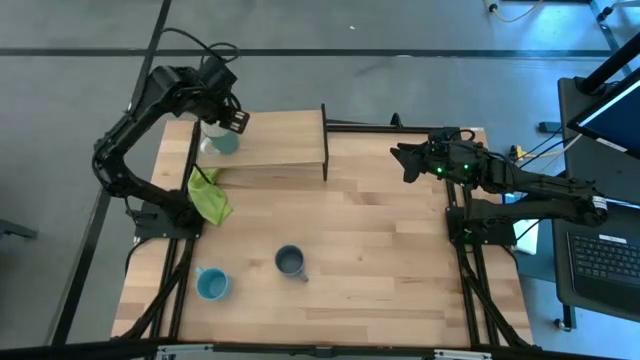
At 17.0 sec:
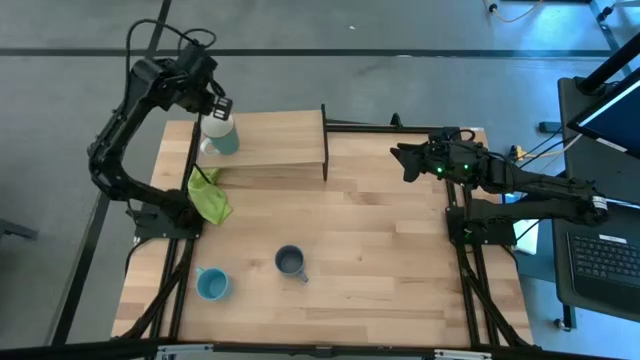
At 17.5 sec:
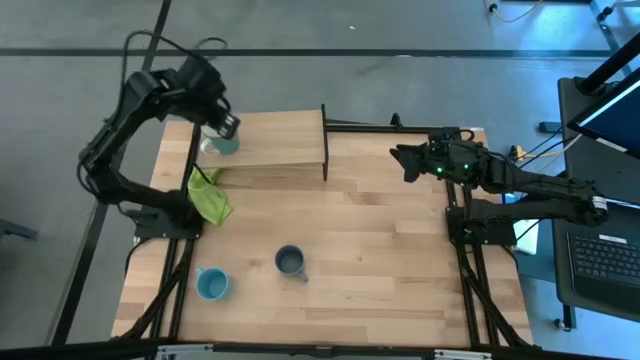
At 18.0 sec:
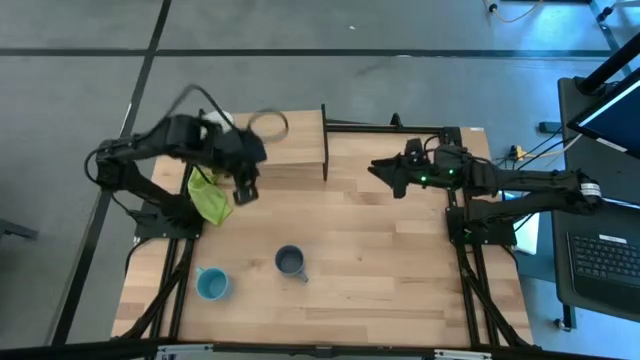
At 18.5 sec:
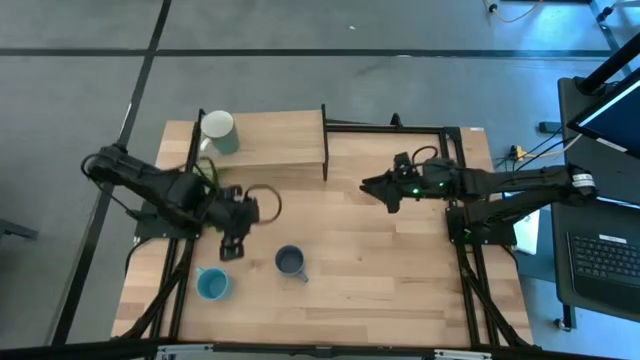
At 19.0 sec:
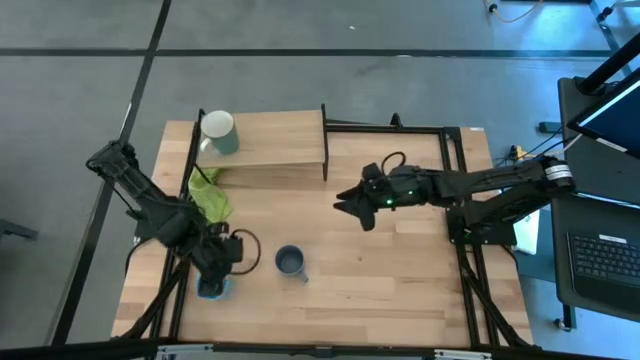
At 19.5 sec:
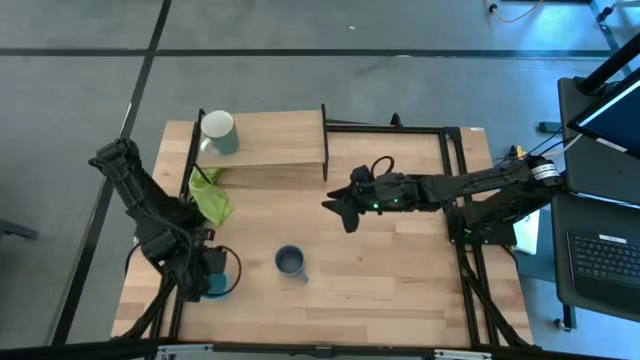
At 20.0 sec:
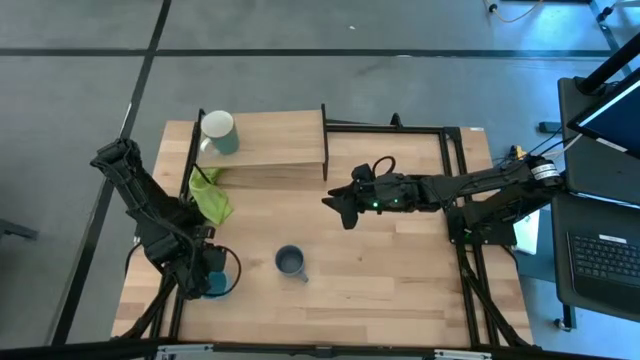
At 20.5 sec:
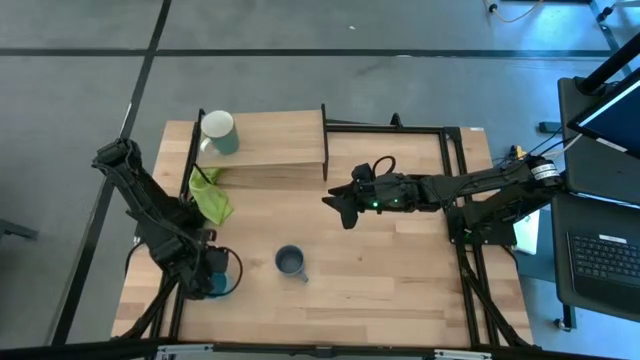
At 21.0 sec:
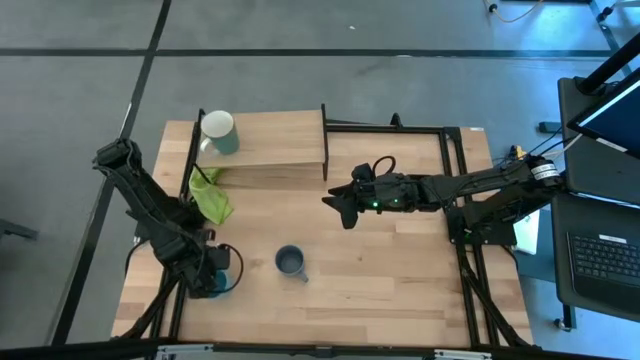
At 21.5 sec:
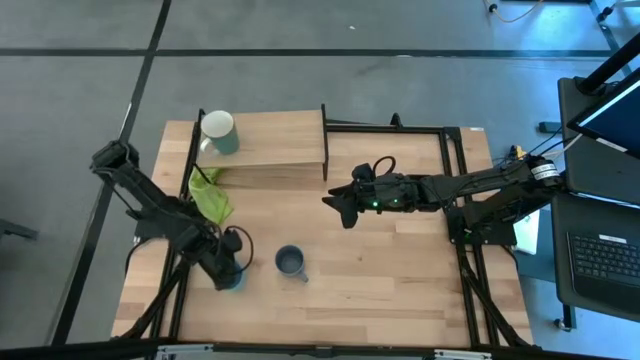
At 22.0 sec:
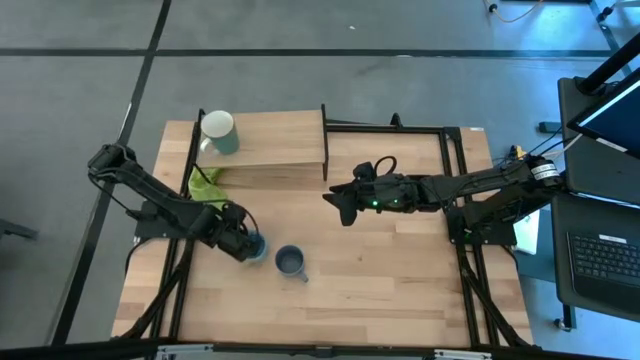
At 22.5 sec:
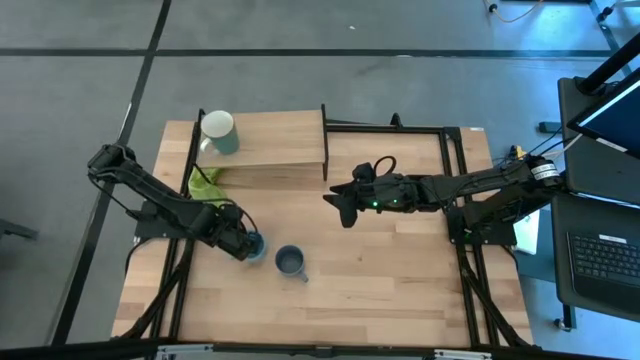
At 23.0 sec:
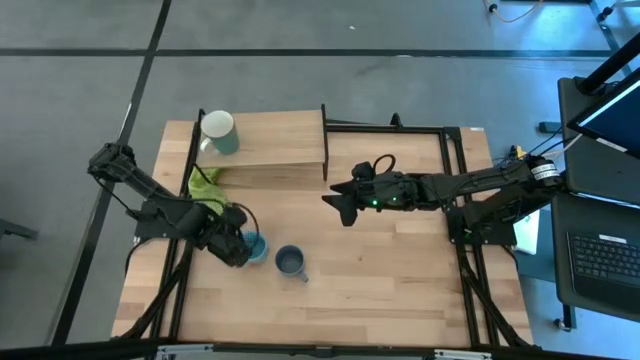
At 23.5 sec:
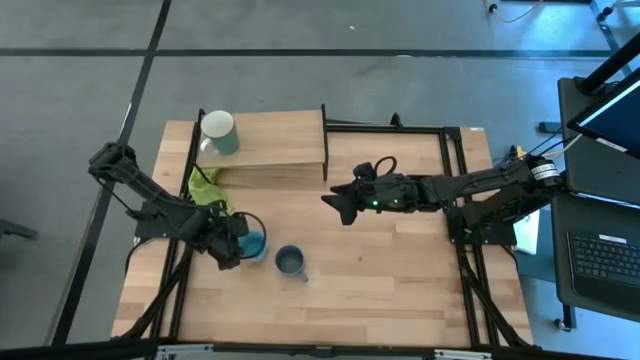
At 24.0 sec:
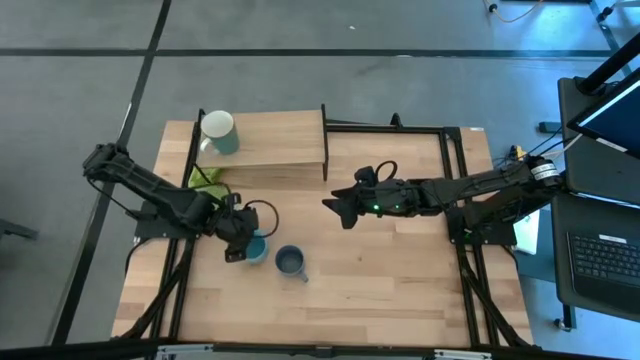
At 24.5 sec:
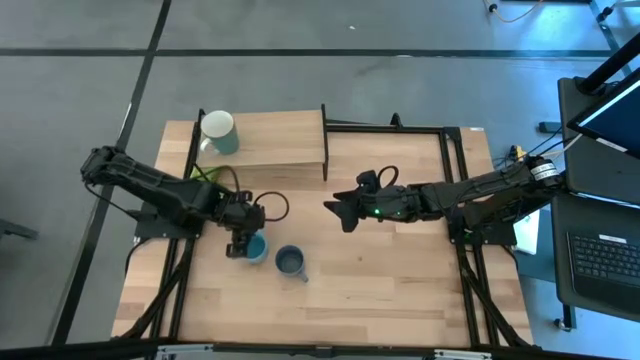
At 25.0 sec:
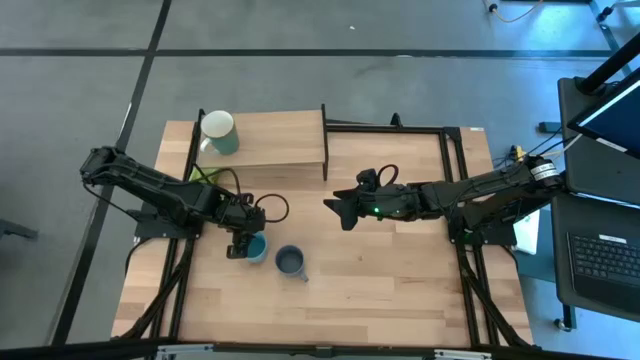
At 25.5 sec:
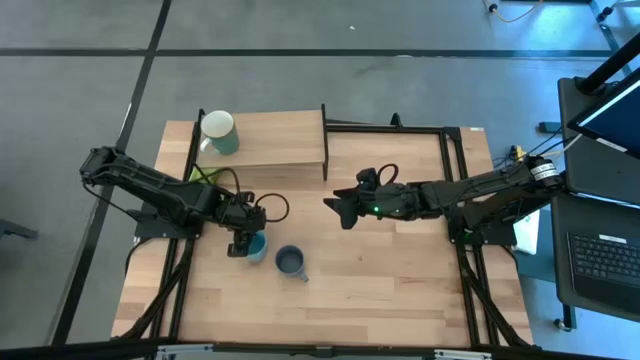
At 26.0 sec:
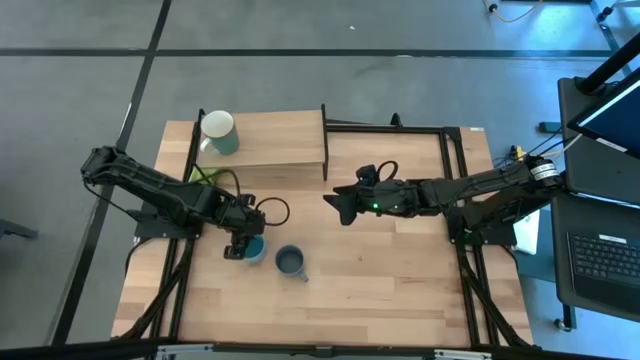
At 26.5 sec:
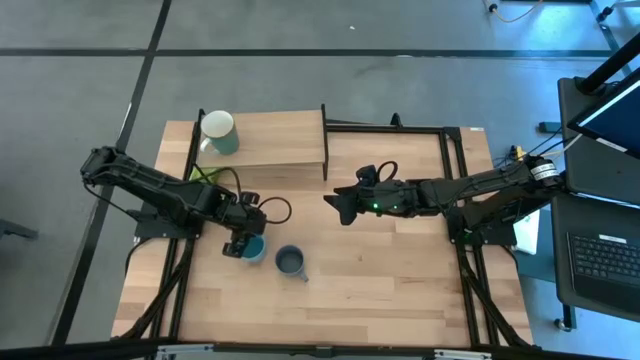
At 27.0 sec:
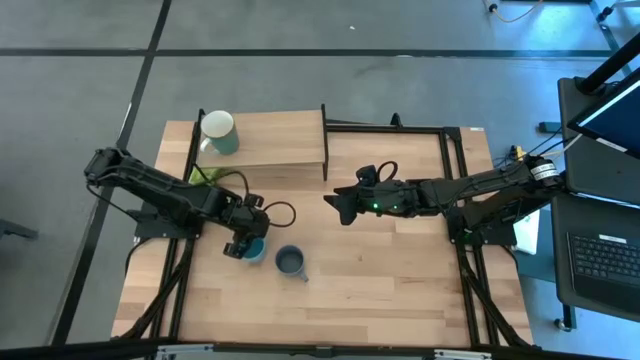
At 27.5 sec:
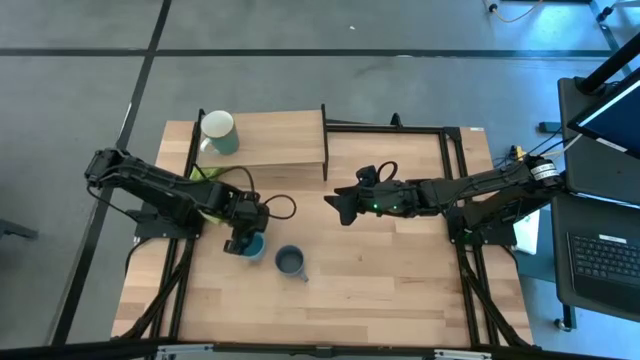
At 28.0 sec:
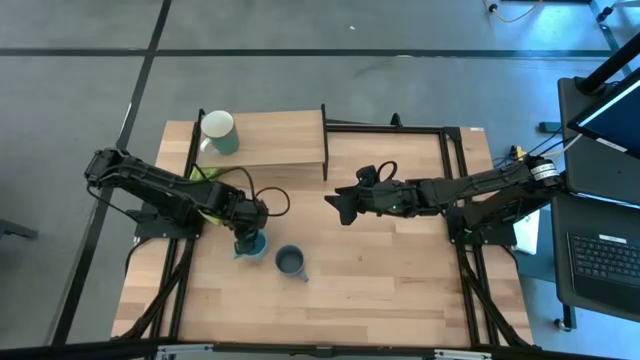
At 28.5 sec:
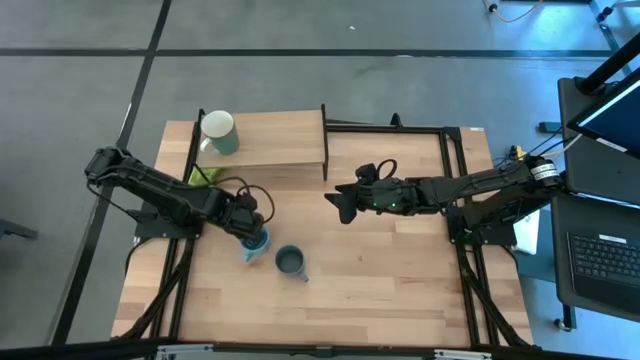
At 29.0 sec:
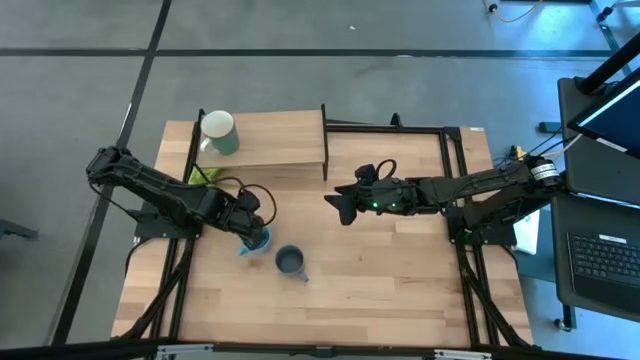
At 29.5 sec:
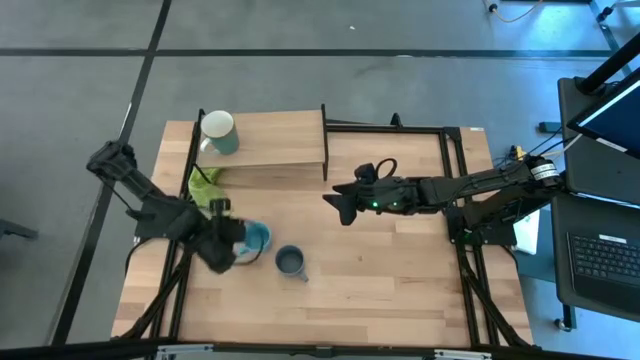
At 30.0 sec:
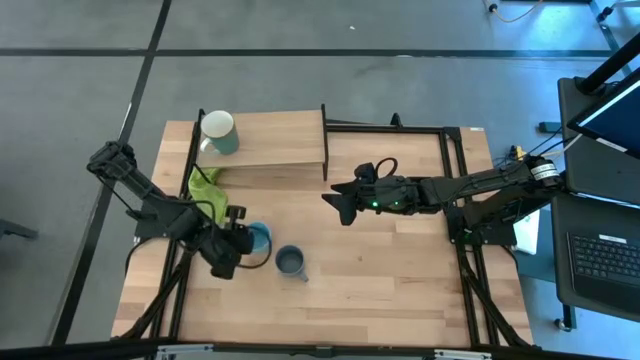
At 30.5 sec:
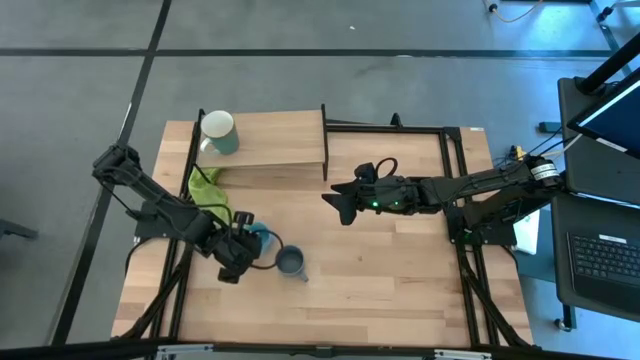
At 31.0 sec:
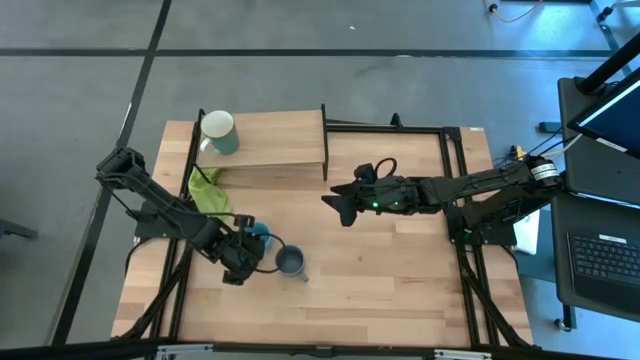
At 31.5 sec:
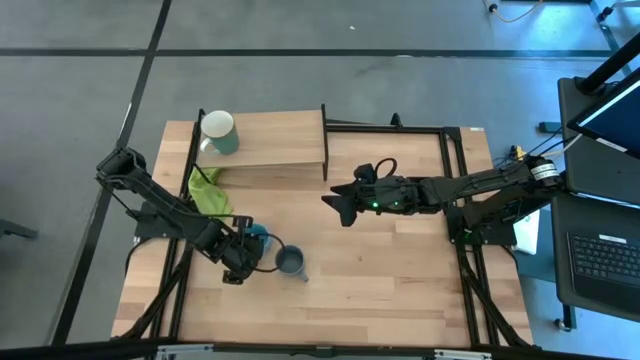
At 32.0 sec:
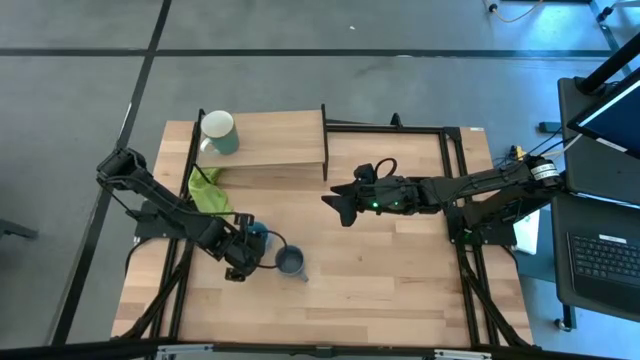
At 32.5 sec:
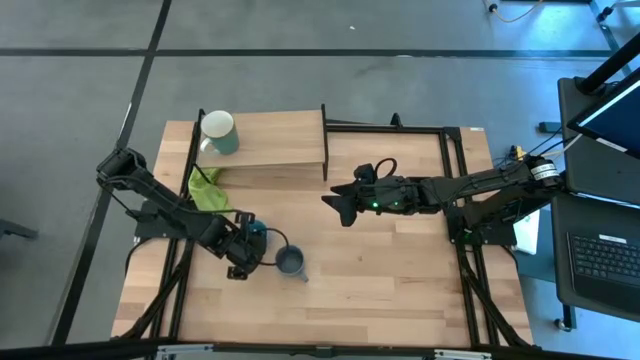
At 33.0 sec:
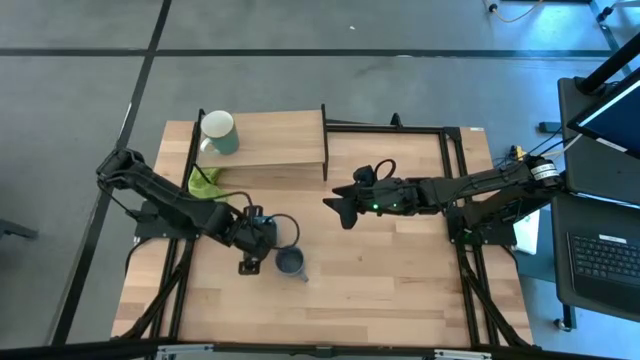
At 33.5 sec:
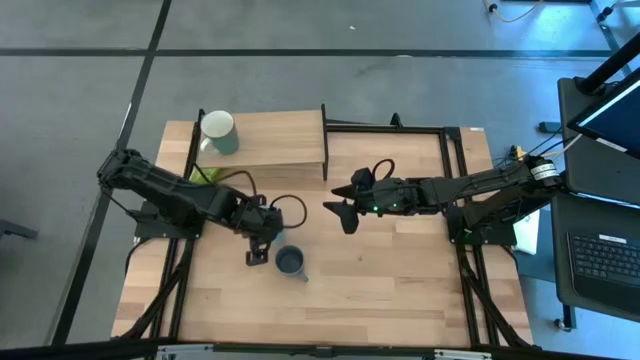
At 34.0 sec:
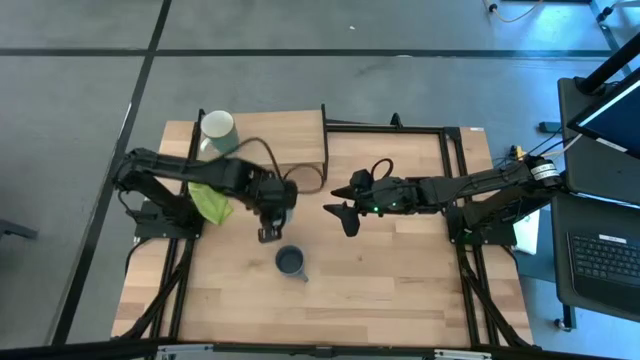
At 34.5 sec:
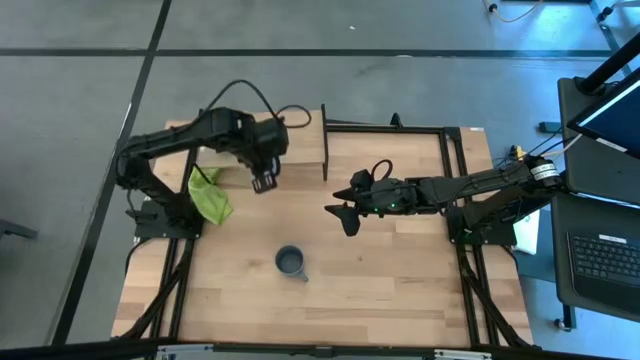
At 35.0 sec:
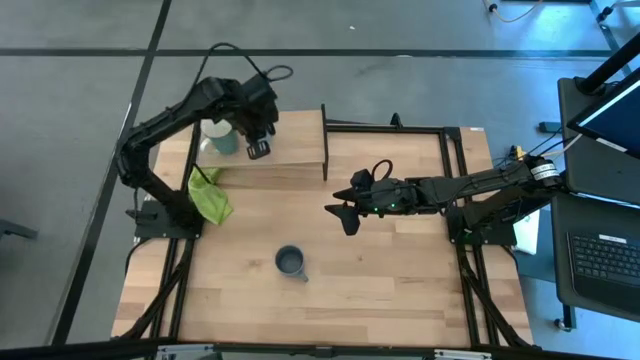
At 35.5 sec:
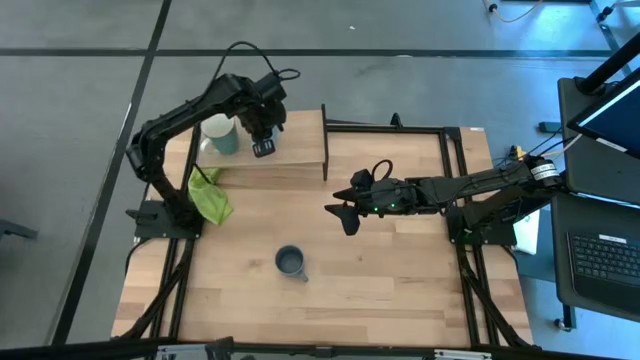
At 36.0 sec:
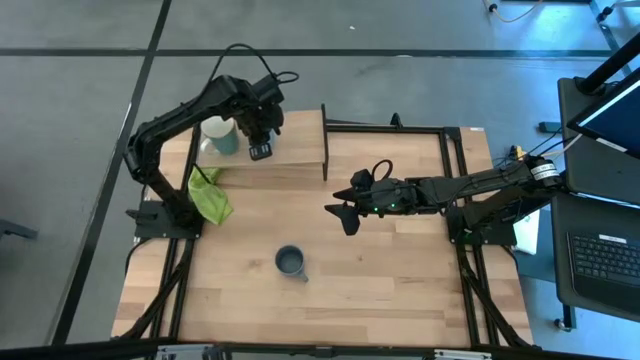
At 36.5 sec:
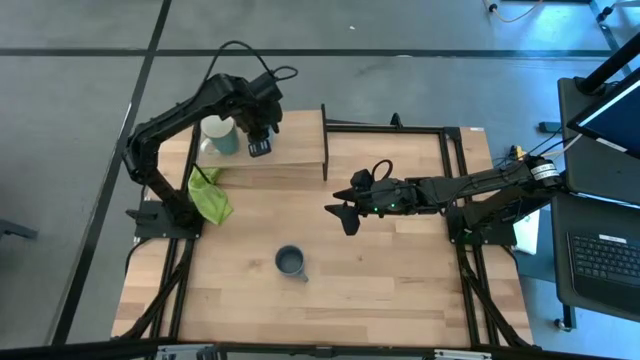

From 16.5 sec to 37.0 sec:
Task: Stack small to large cups/mugs on shelf
Put the light blue mug on the shelf
